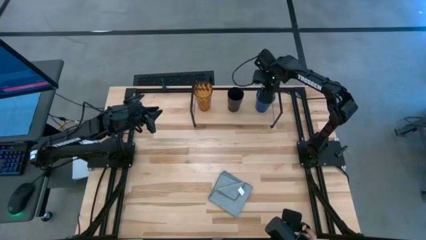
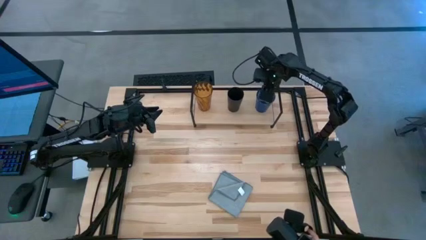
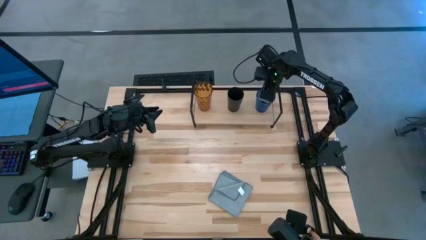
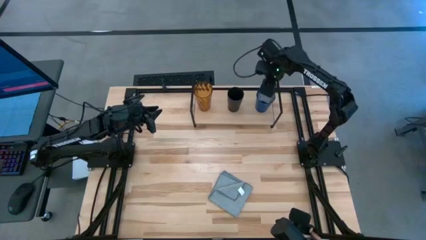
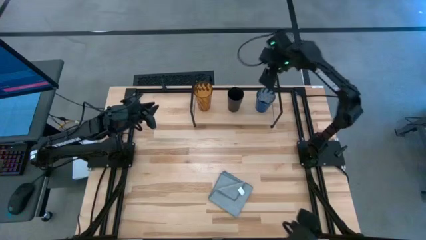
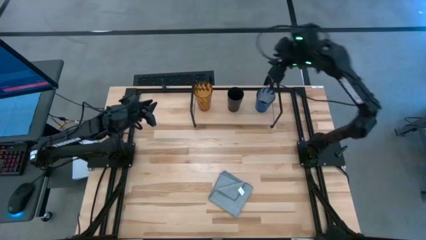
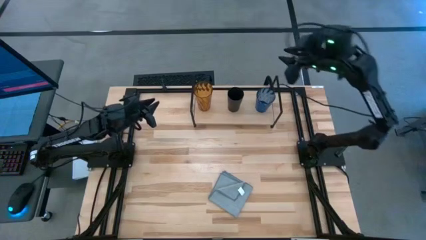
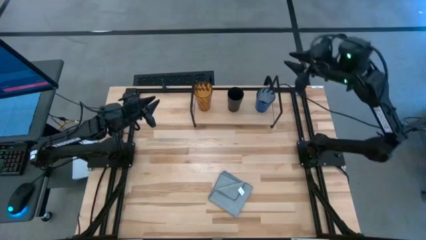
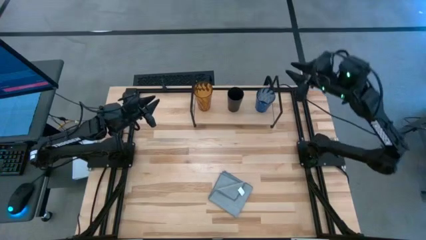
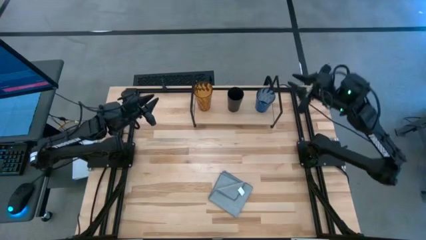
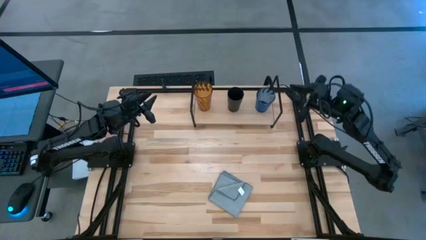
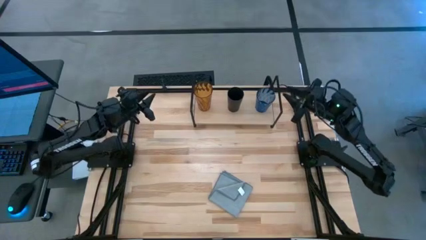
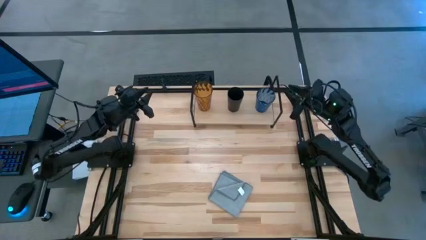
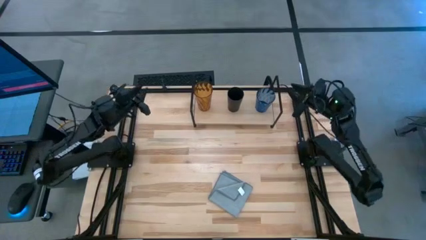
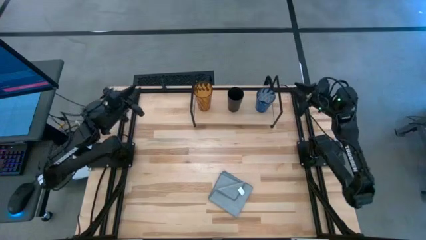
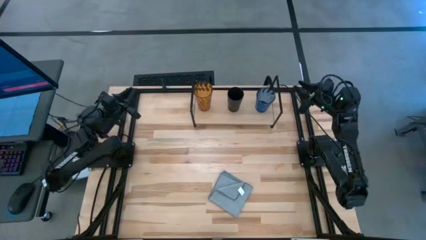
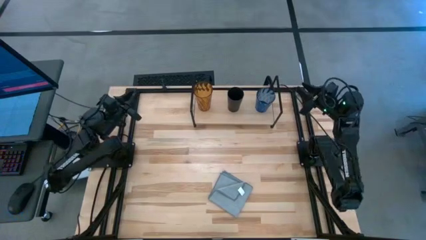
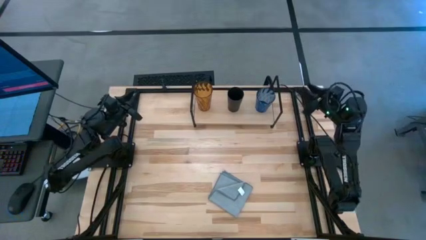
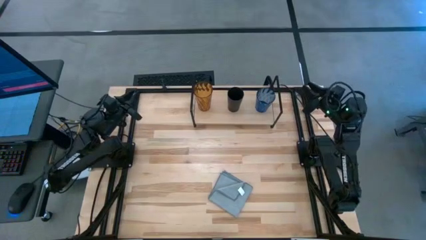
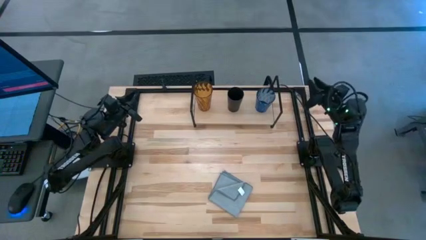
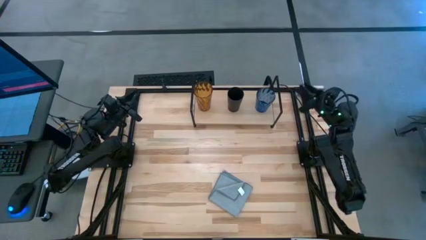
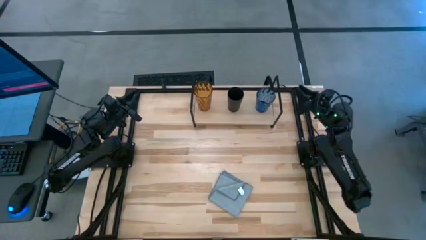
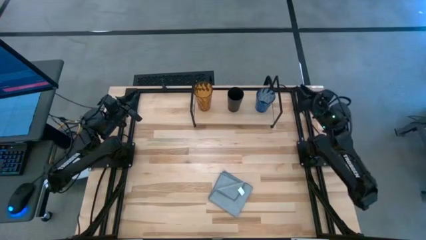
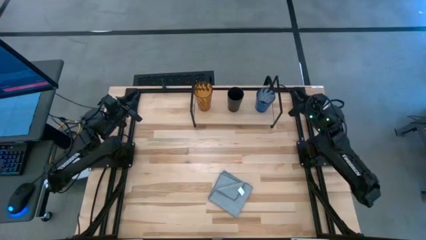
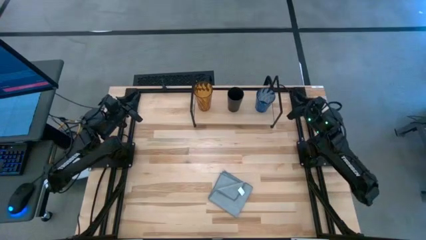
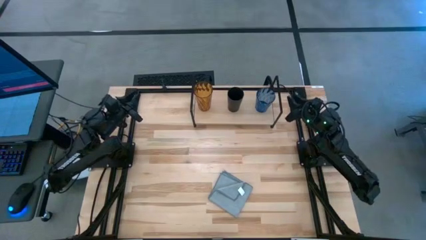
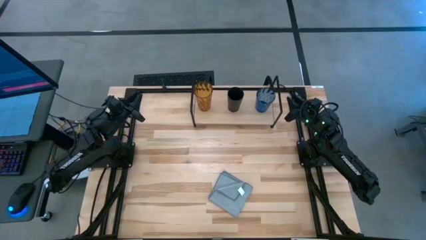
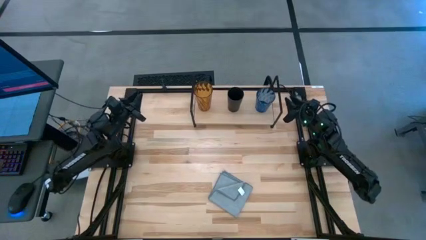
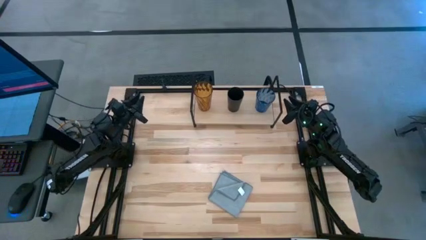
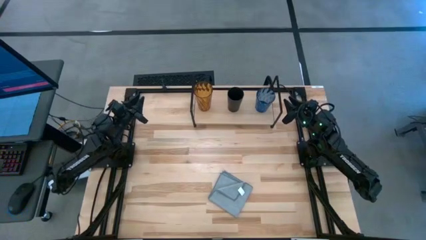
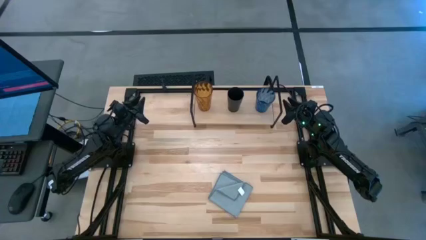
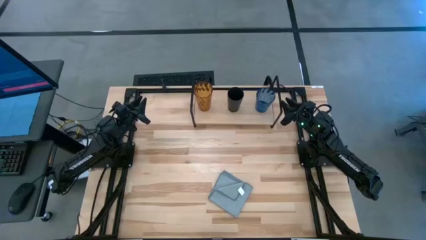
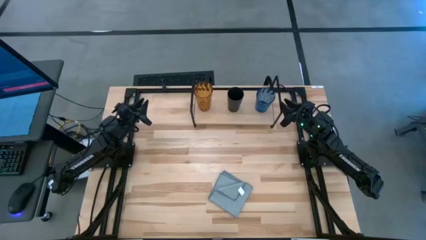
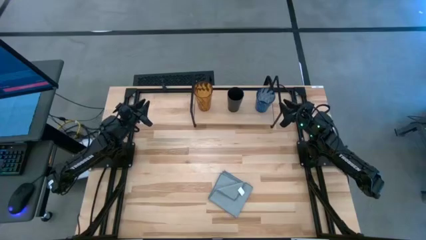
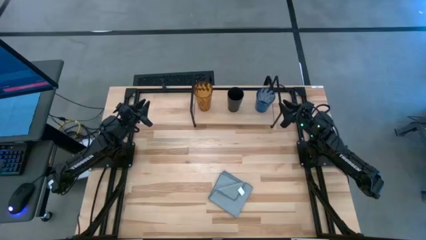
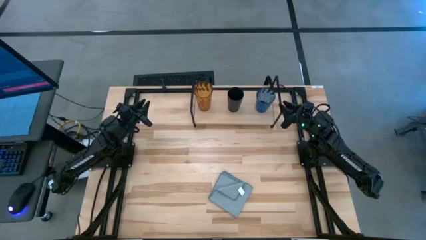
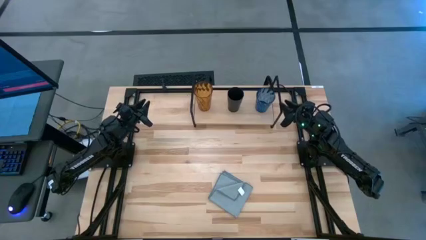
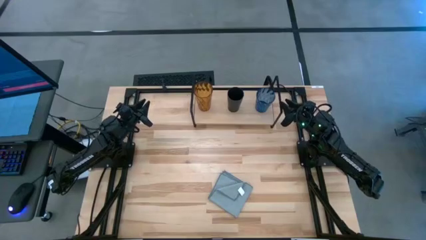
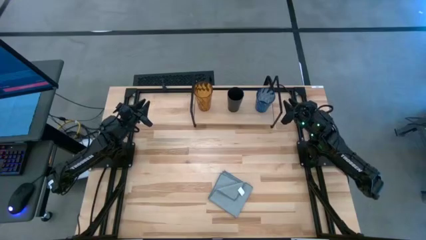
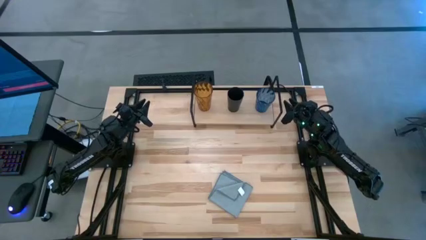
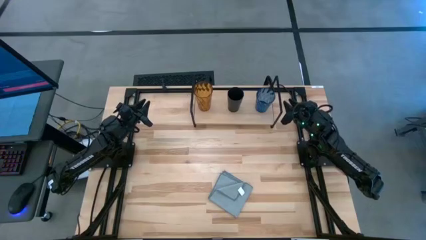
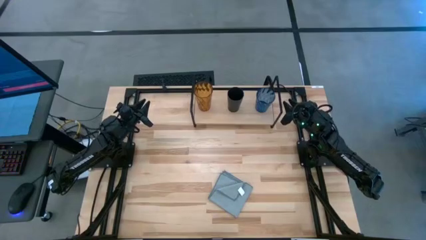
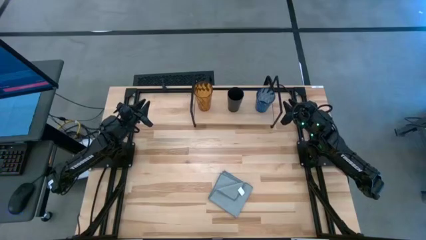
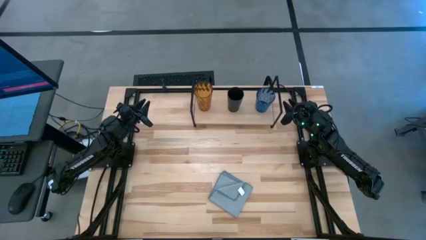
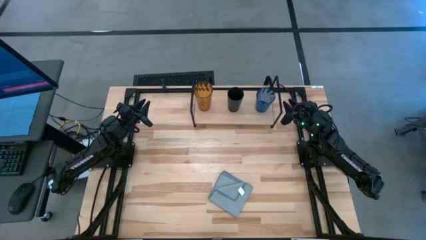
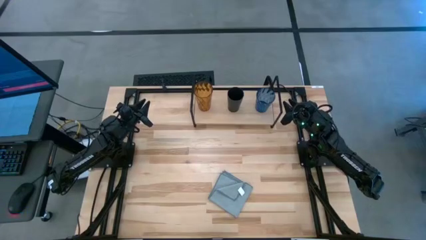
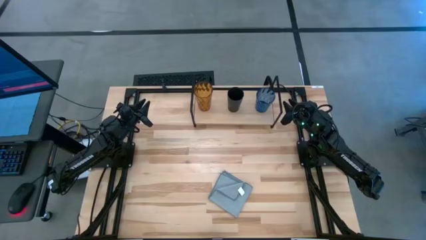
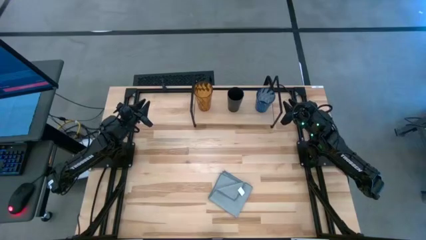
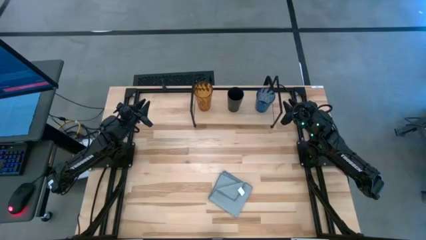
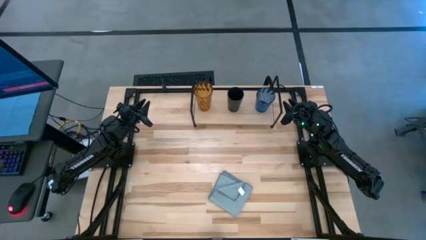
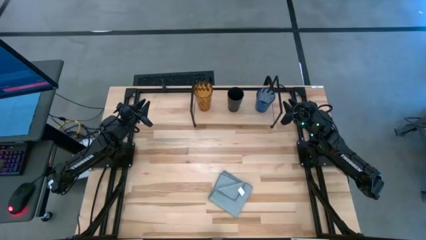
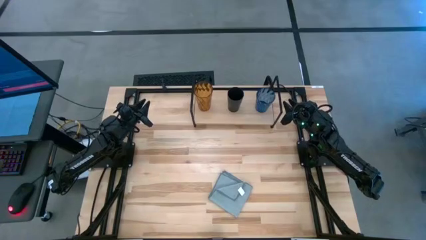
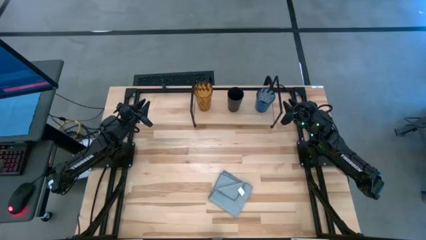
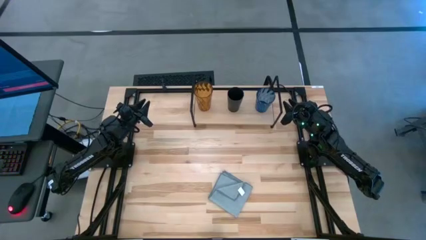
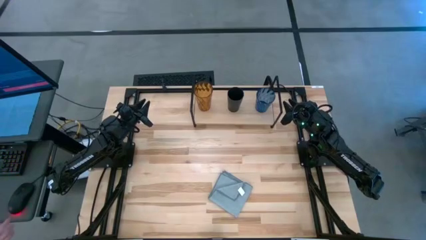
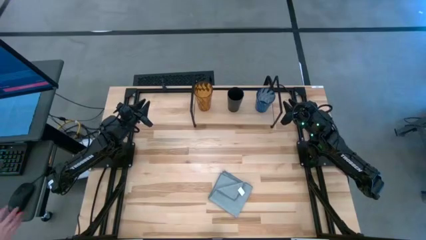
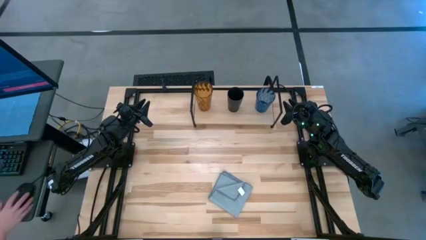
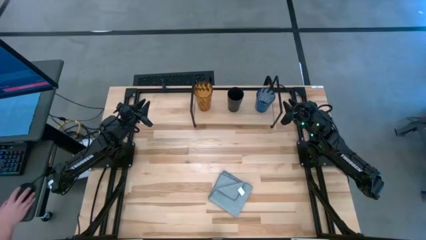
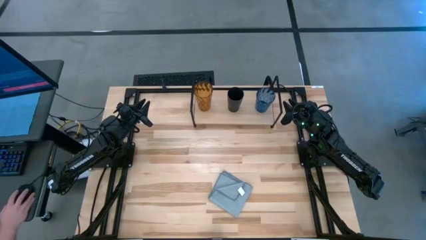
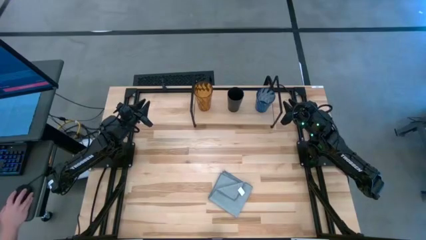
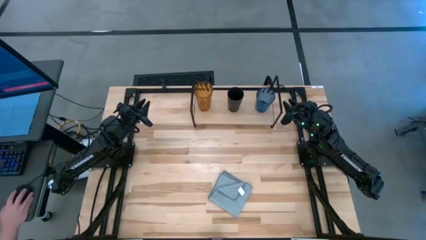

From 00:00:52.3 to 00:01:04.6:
Task: Stack small to large cups/mugs on shelf
Return to Home Position
